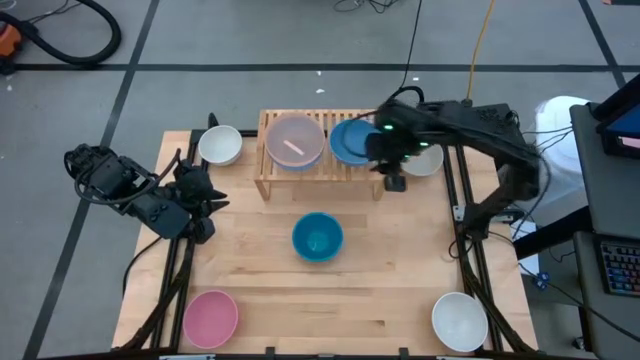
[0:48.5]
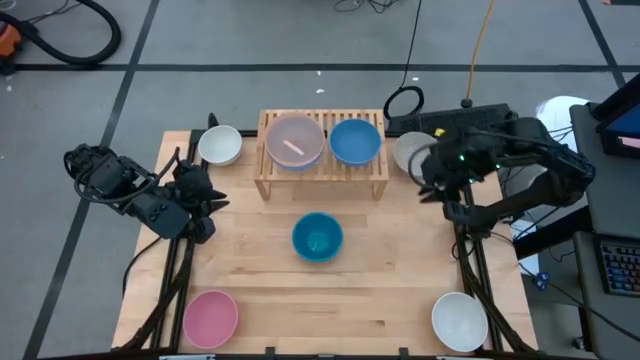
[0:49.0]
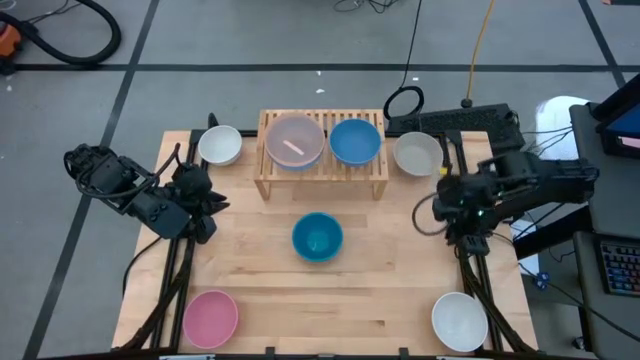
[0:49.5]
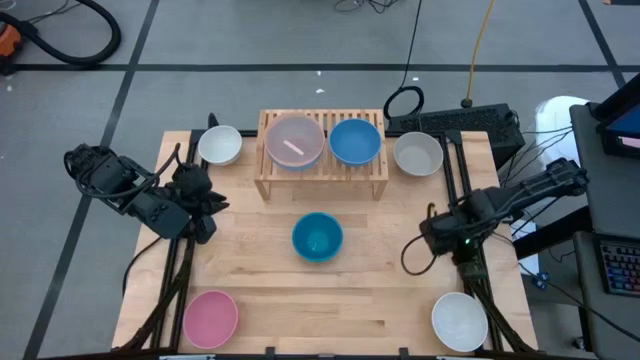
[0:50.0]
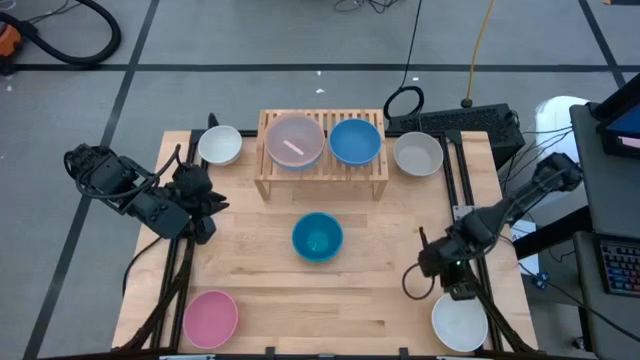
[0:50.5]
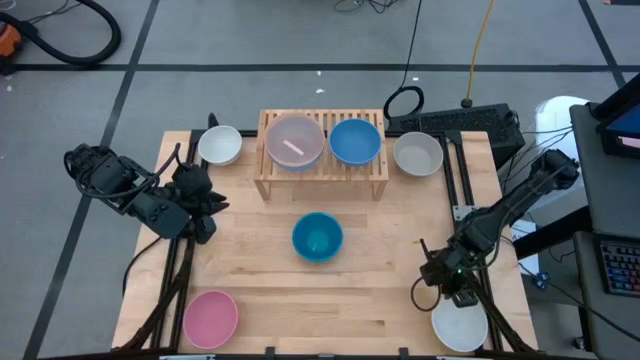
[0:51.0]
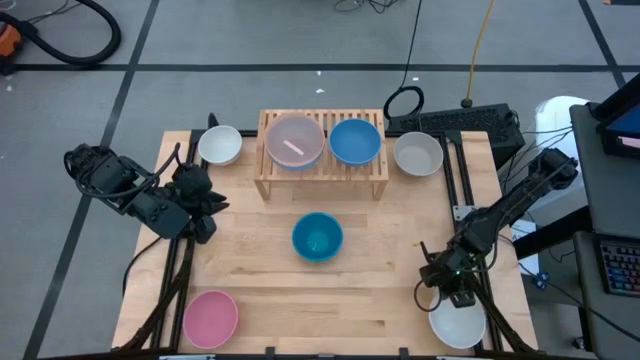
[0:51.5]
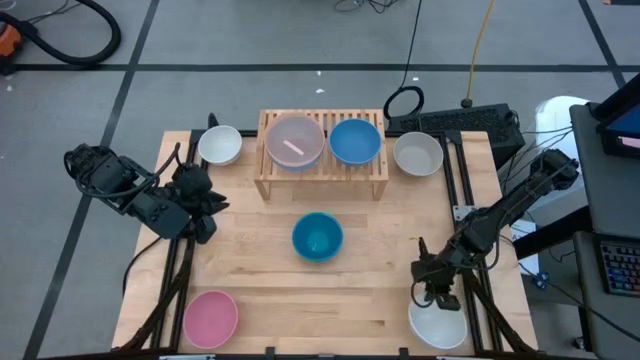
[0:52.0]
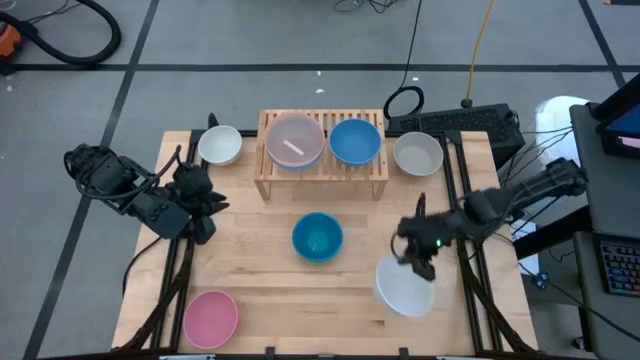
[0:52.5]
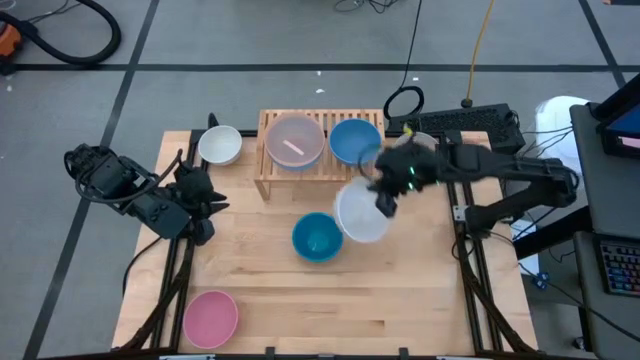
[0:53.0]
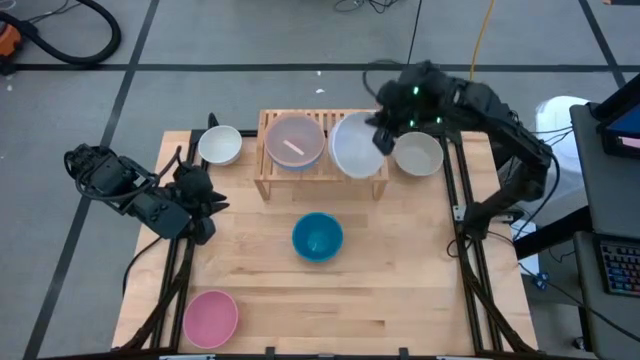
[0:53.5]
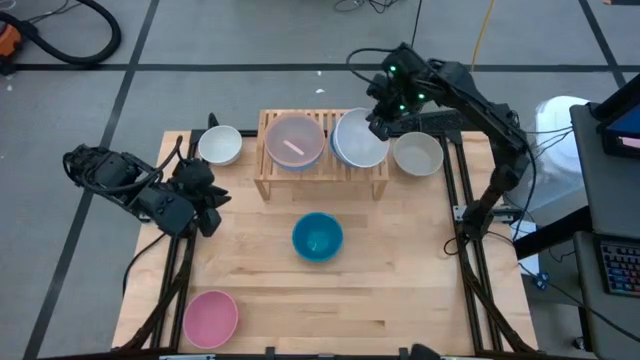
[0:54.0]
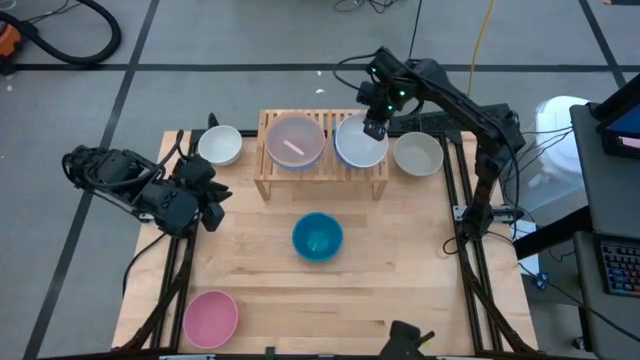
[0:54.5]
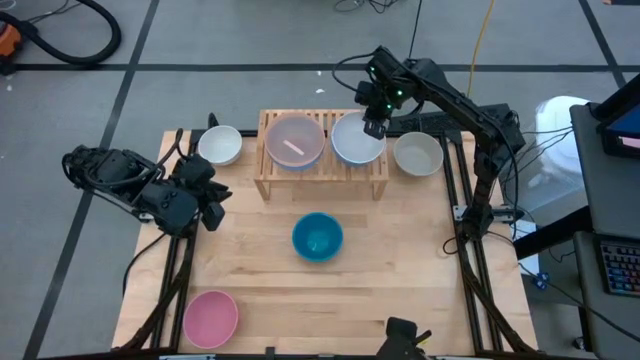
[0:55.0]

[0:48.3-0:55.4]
Task: Place and stack bowls onto a shelf
Stack the white bowl on top of blue bowl on the shelf

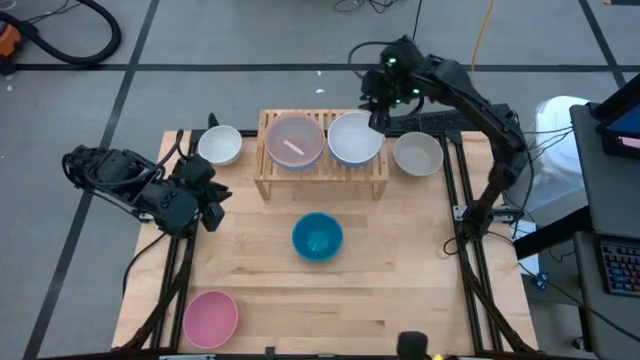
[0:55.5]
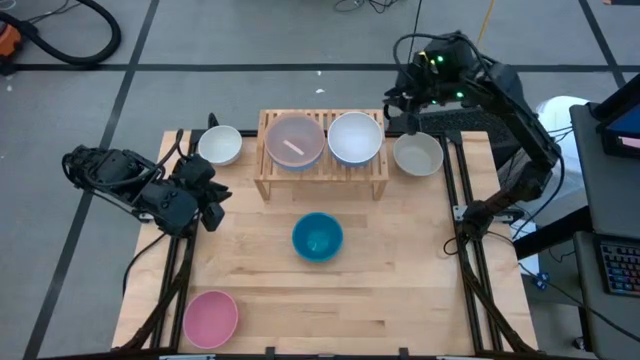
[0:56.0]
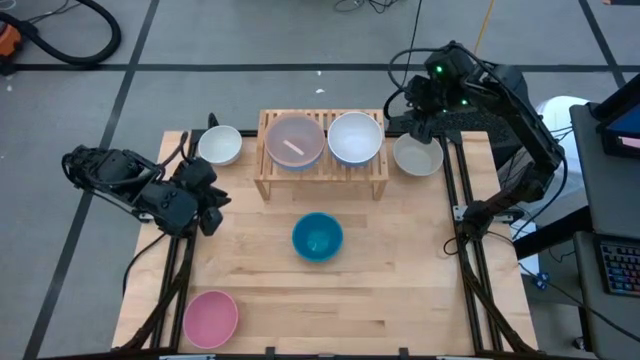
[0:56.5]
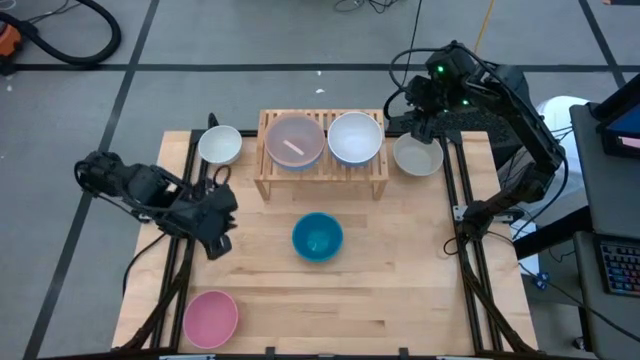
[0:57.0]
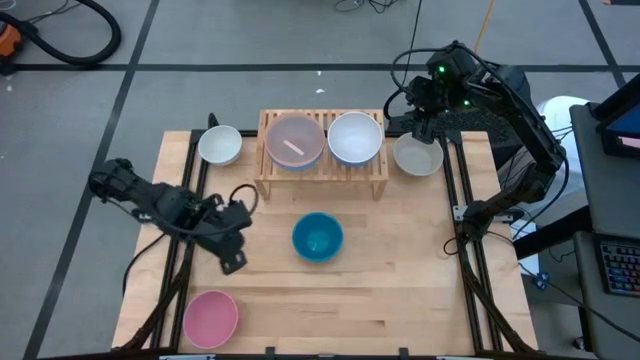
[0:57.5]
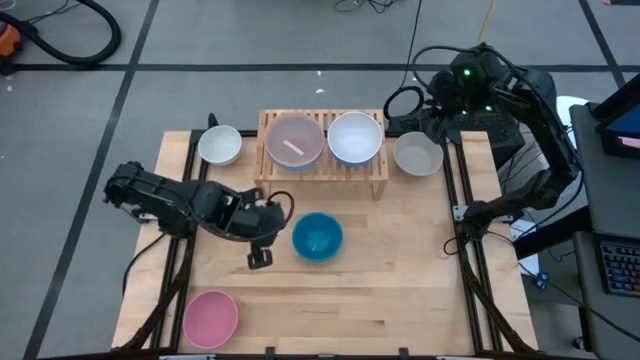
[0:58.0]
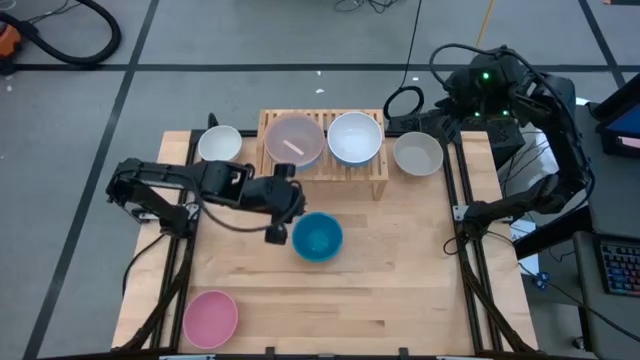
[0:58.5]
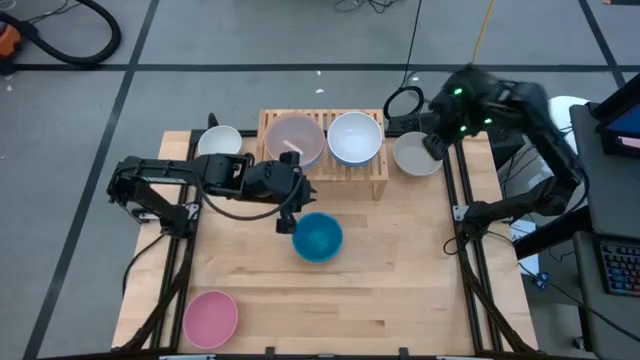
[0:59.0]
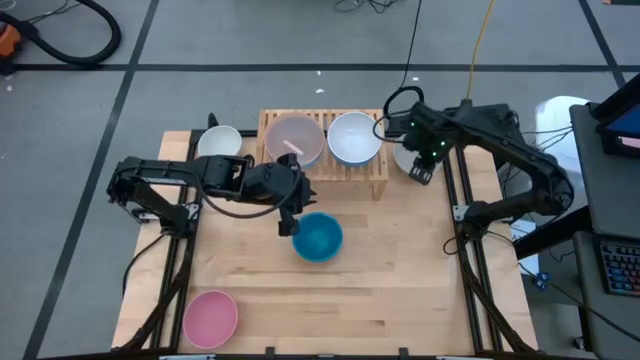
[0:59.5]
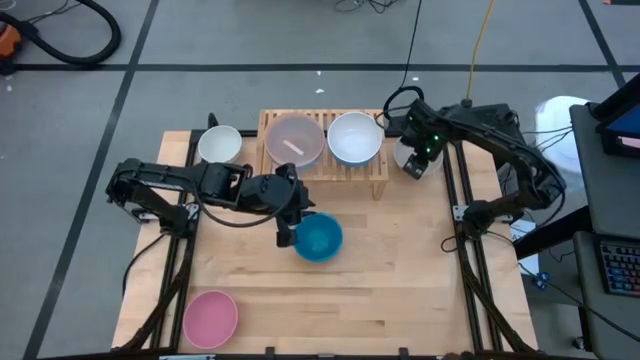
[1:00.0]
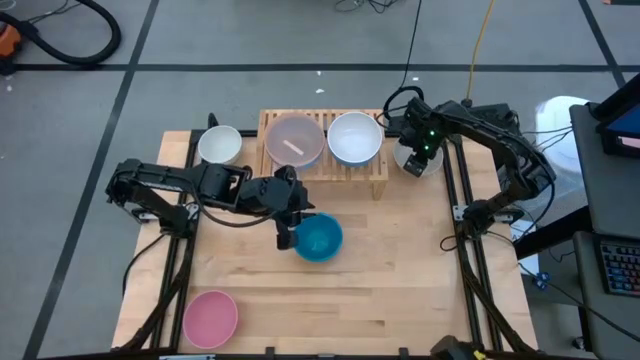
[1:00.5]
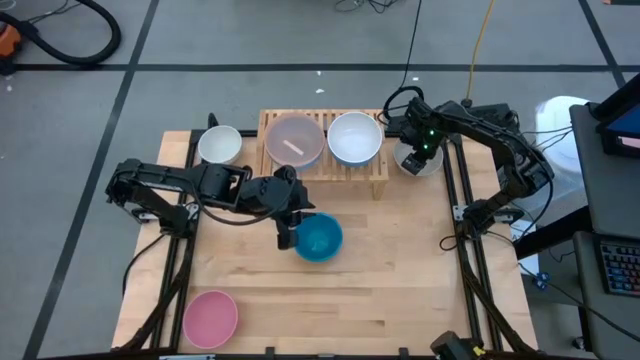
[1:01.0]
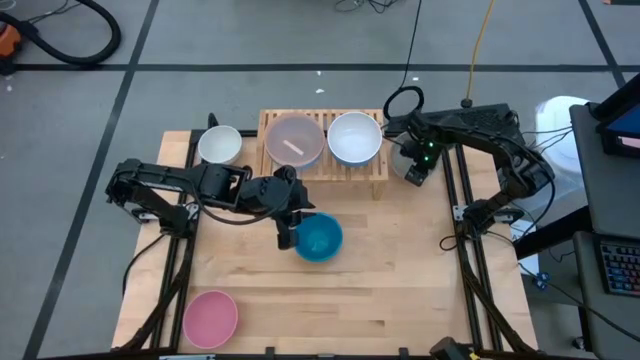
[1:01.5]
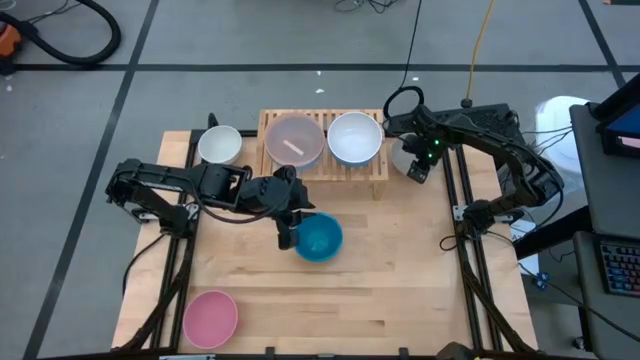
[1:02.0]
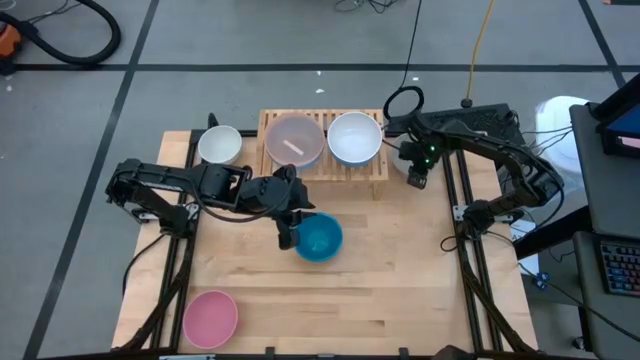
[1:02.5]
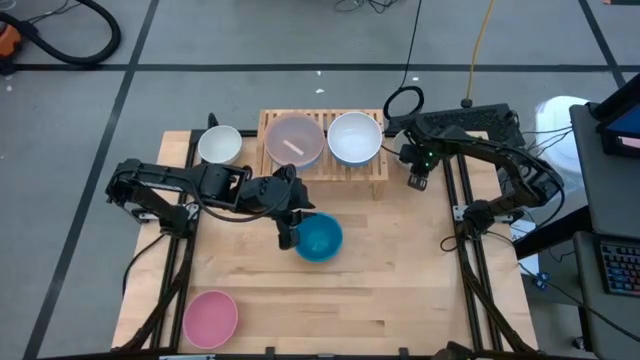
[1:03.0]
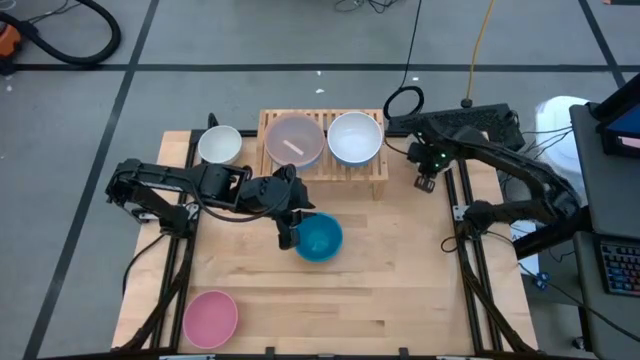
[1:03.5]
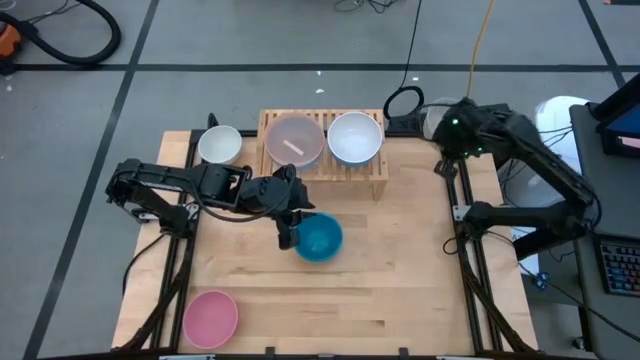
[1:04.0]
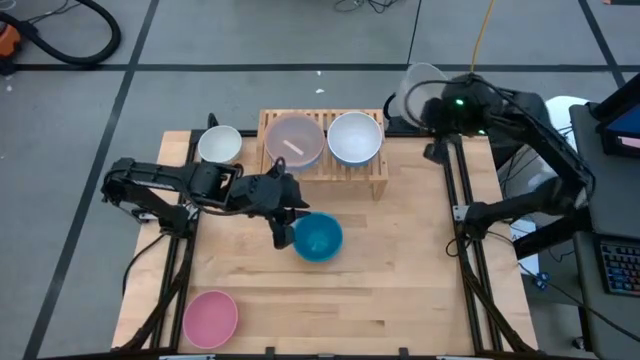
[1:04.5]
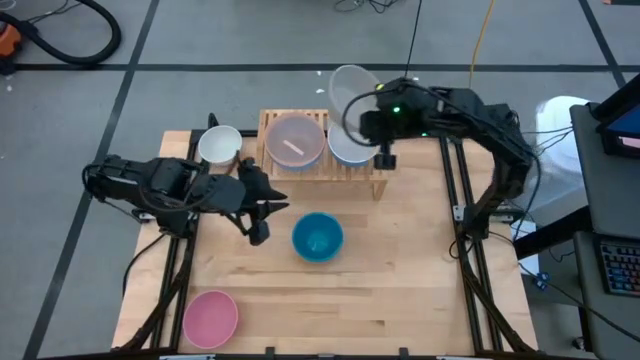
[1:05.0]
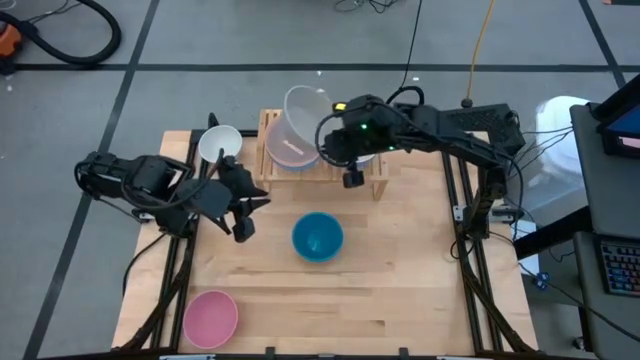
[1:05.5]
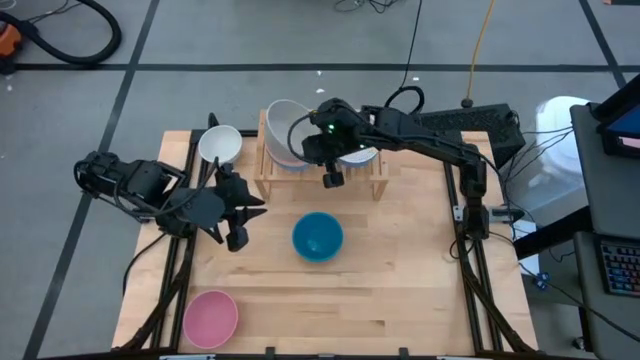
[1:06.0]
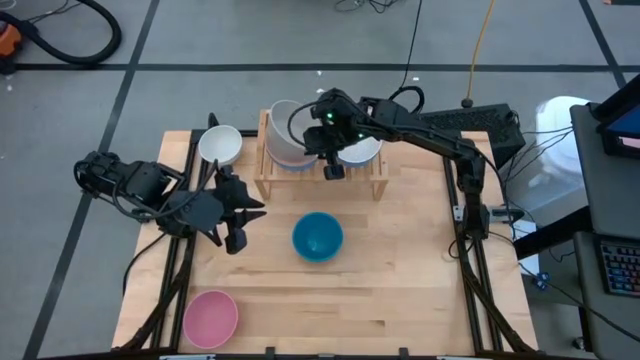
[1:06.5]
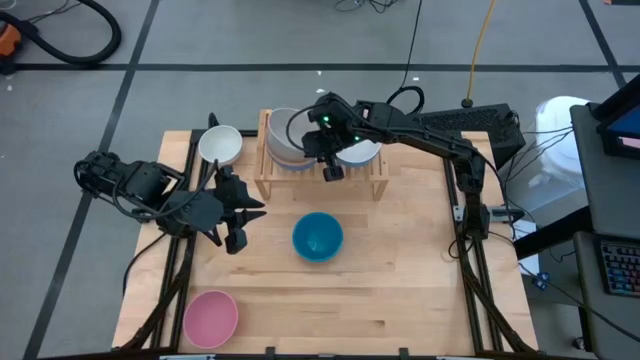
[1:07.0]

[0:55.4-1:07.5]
Stack the gray bowl on top of the orange bowl on the shelf

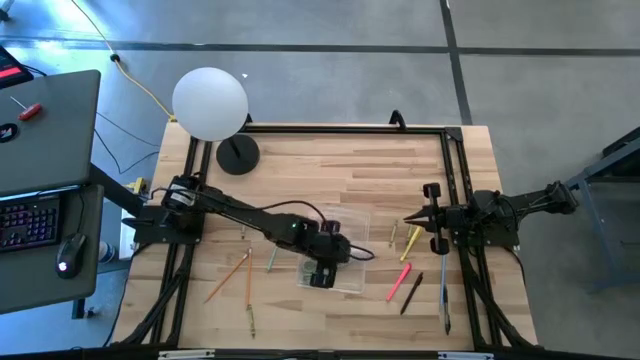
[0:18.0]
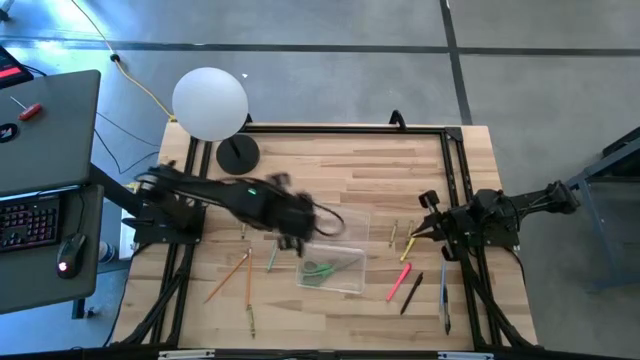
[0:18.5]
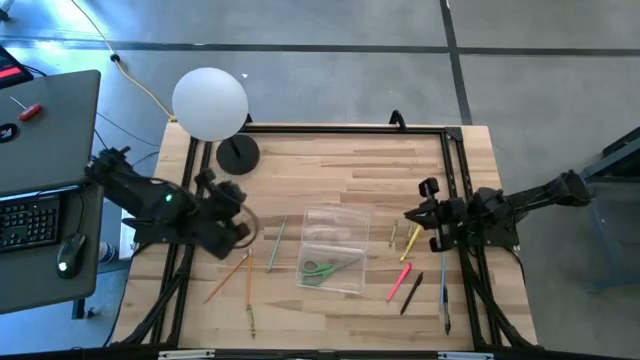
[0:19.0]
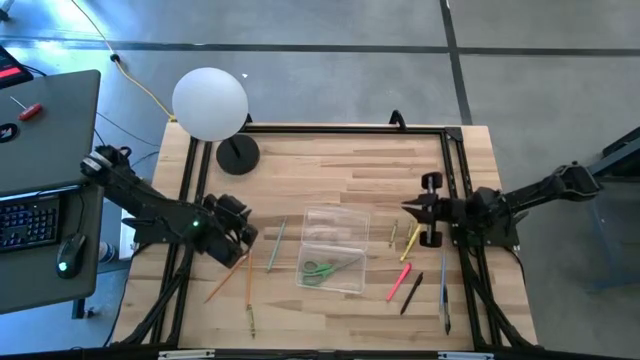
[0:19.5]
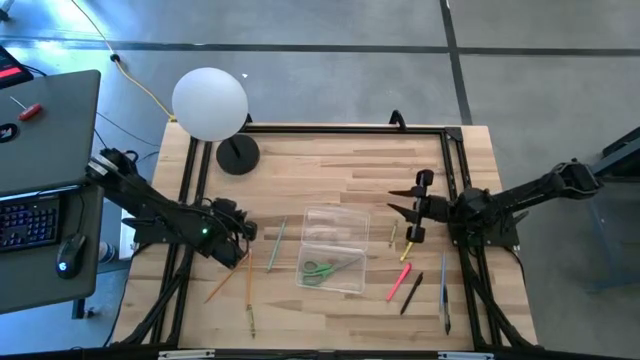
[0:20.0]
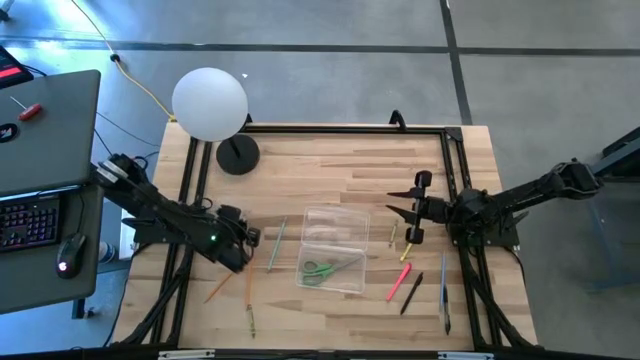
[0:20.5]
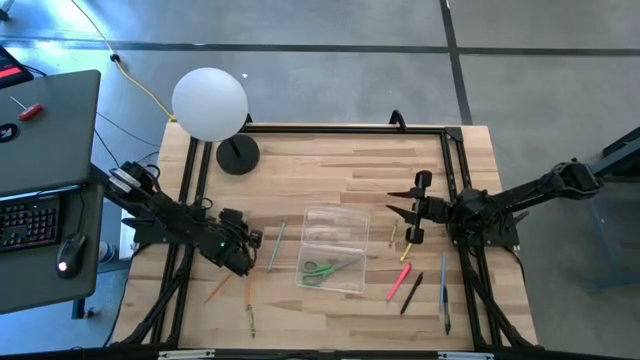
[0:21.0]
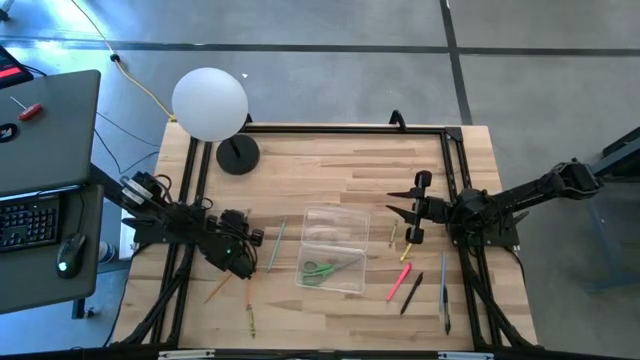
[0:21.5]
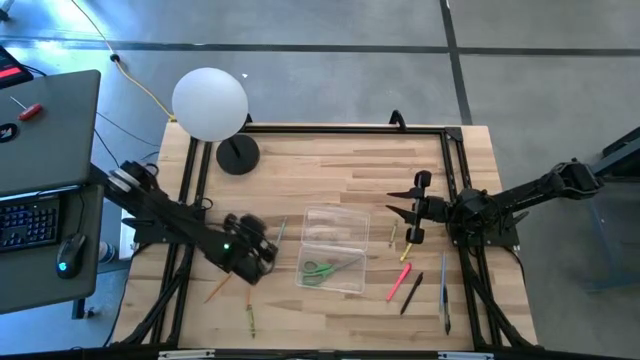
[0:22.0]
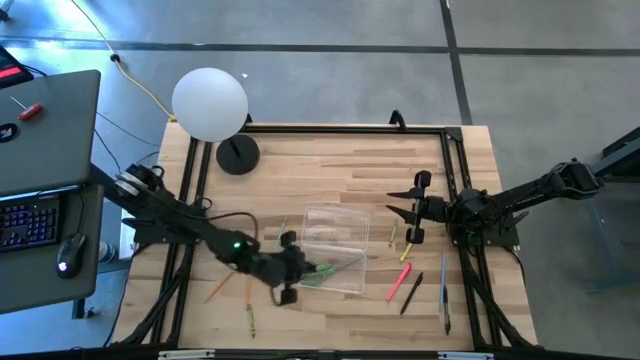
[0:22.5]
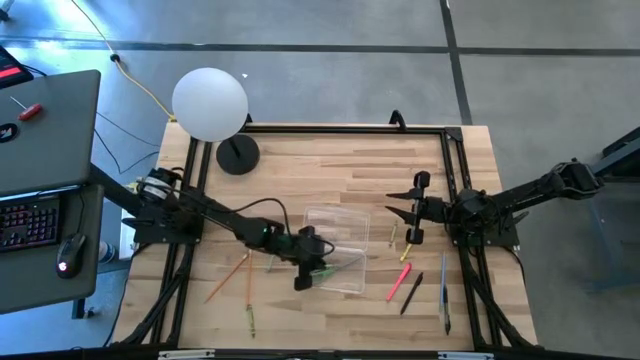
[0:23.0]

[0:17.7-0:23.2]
Task: Pick & place school supplies into a supply box
Put the green crayon into the transparent supply box
